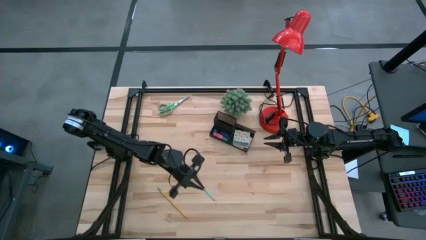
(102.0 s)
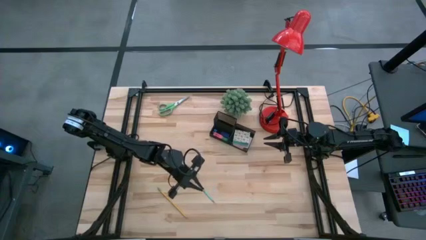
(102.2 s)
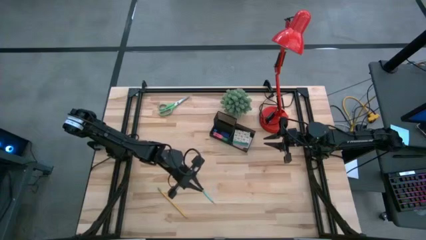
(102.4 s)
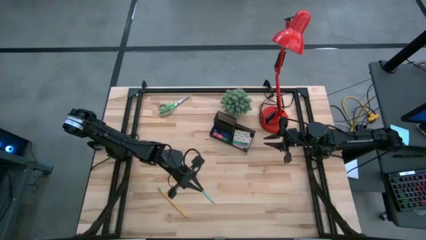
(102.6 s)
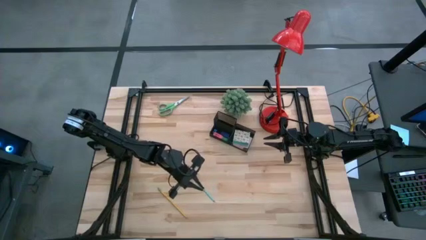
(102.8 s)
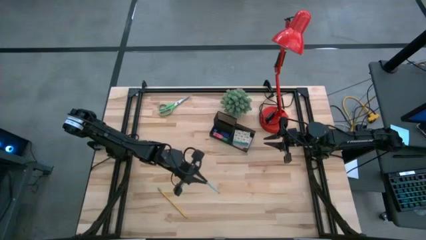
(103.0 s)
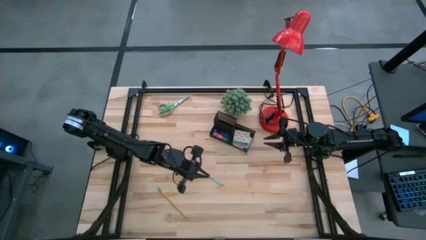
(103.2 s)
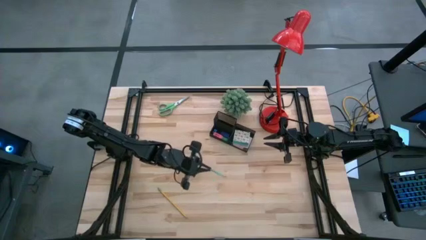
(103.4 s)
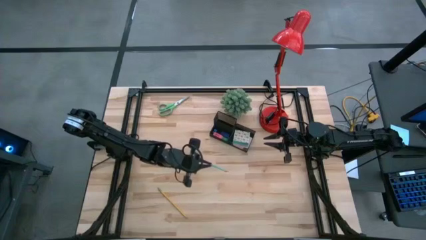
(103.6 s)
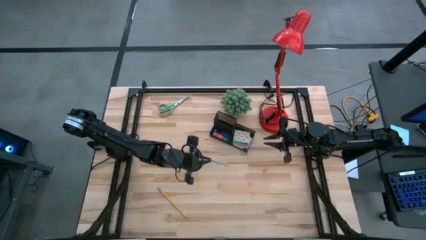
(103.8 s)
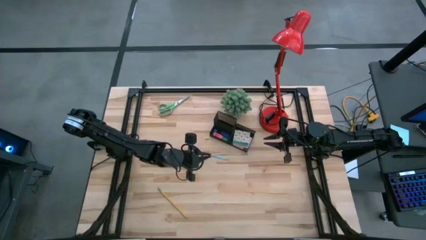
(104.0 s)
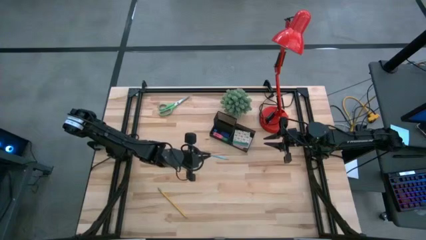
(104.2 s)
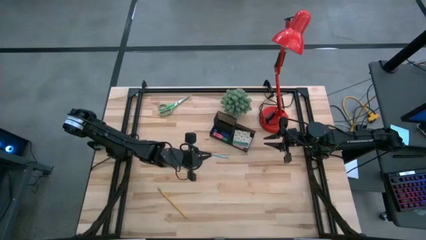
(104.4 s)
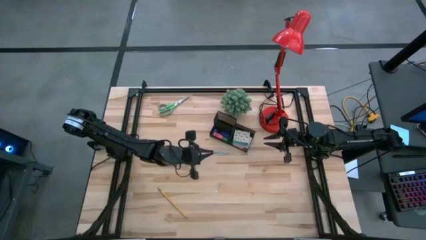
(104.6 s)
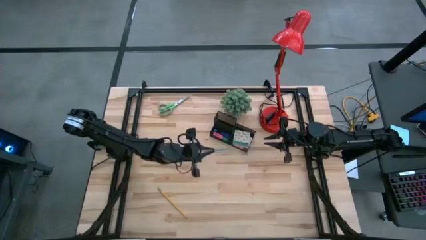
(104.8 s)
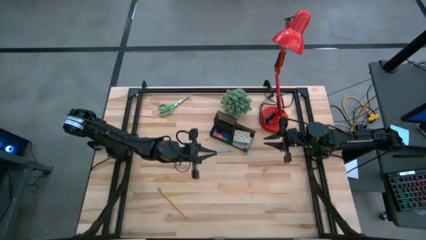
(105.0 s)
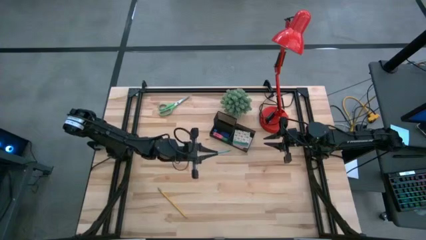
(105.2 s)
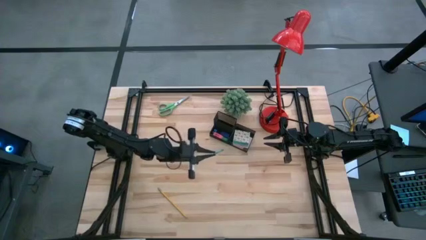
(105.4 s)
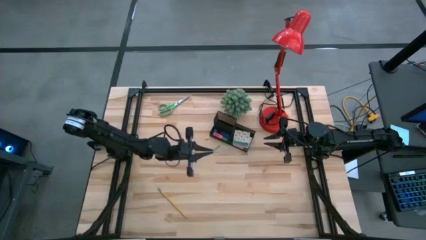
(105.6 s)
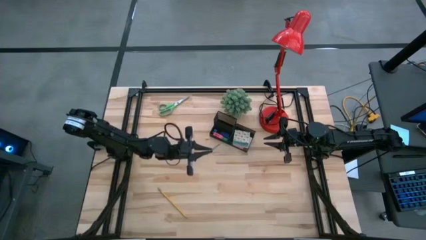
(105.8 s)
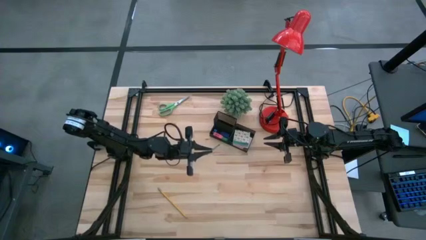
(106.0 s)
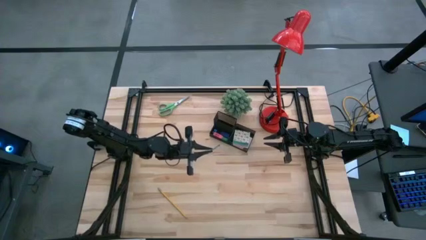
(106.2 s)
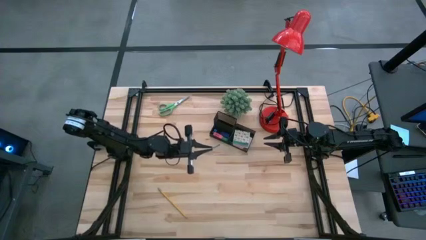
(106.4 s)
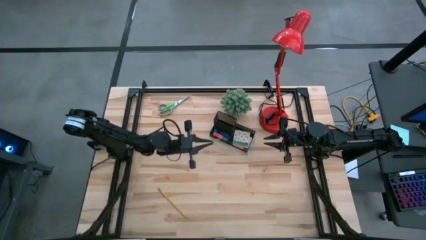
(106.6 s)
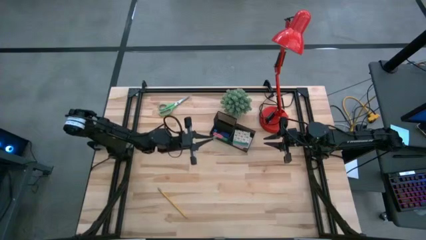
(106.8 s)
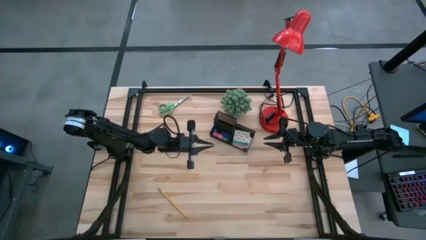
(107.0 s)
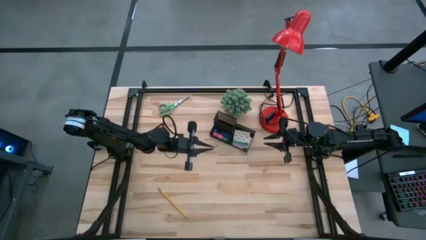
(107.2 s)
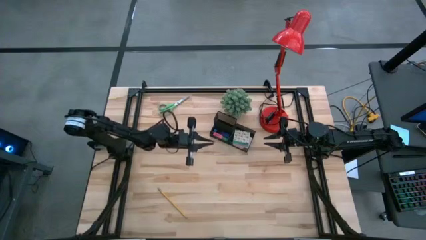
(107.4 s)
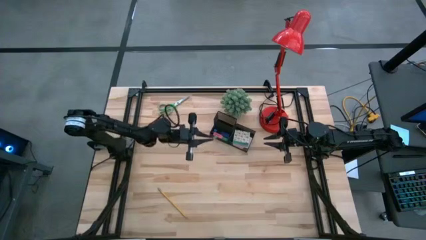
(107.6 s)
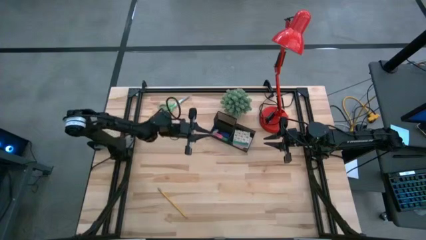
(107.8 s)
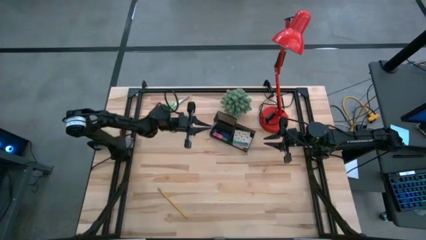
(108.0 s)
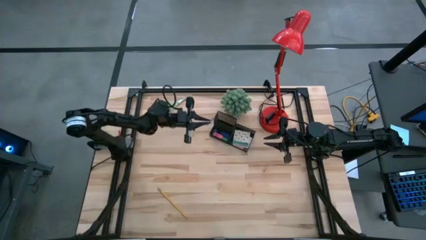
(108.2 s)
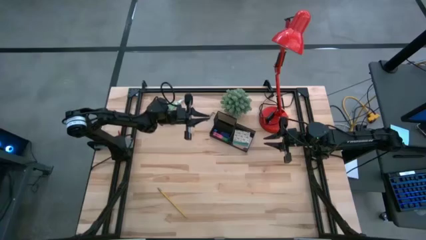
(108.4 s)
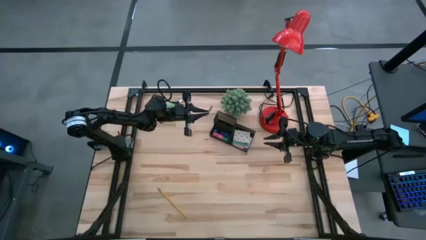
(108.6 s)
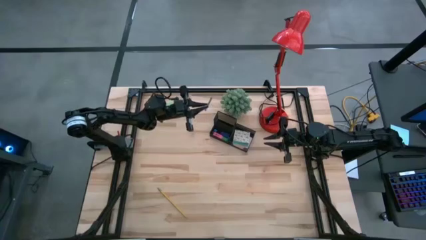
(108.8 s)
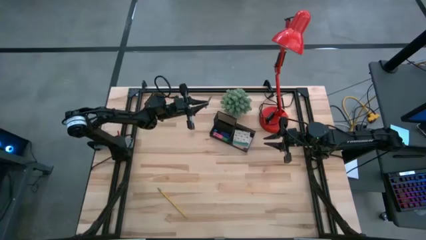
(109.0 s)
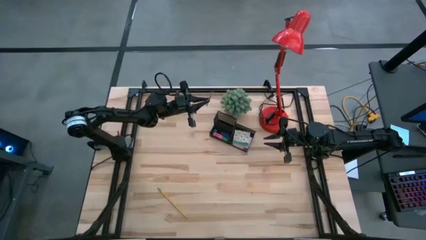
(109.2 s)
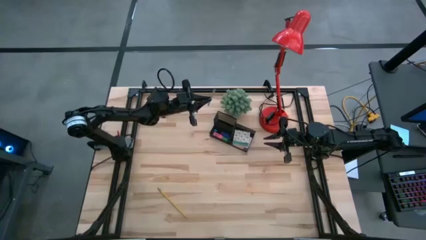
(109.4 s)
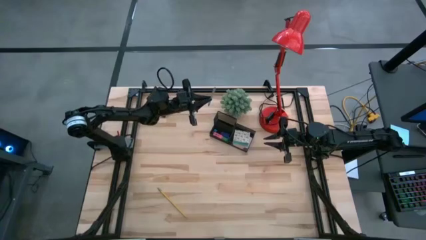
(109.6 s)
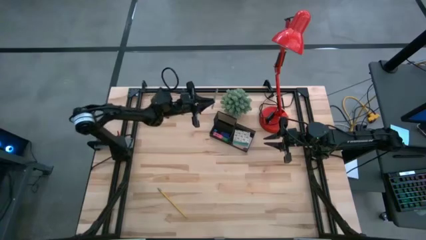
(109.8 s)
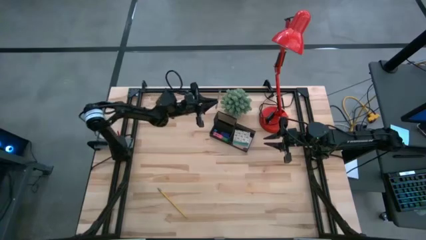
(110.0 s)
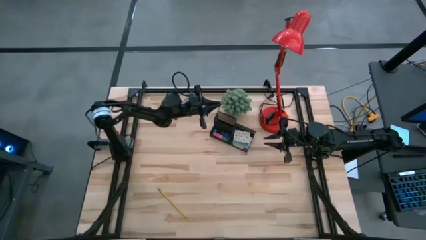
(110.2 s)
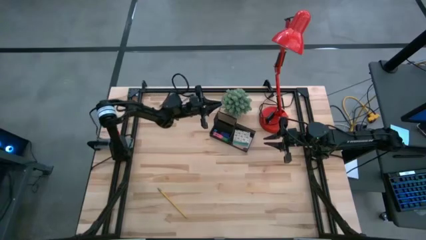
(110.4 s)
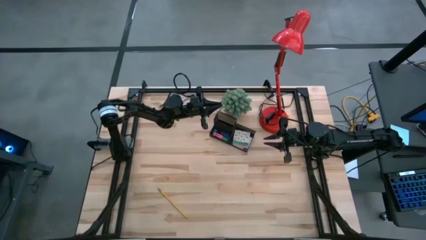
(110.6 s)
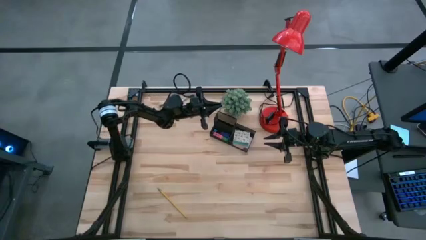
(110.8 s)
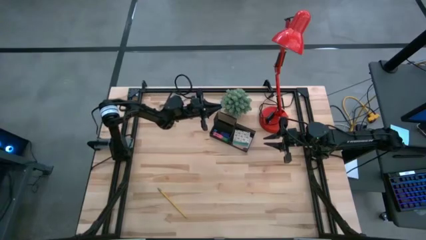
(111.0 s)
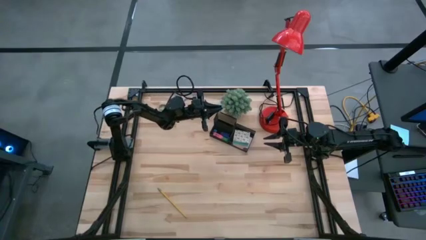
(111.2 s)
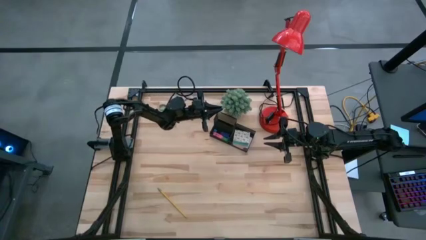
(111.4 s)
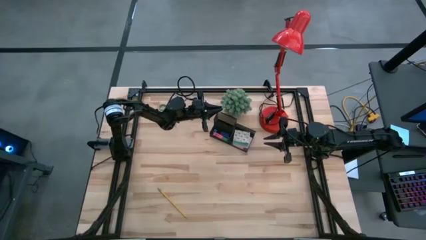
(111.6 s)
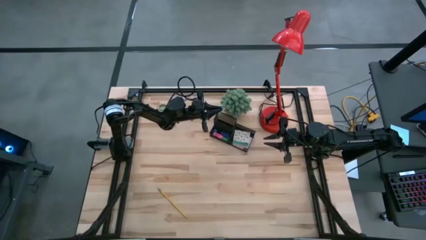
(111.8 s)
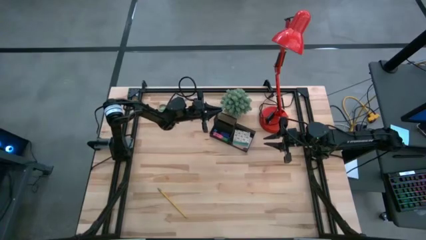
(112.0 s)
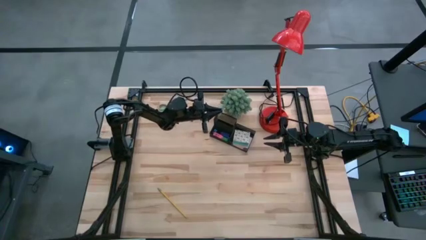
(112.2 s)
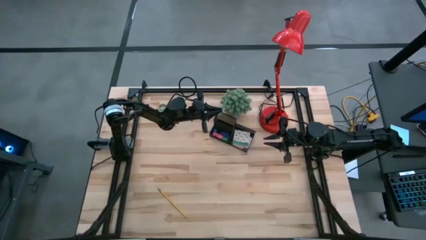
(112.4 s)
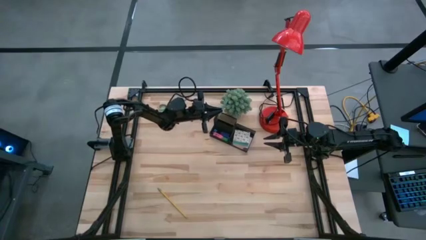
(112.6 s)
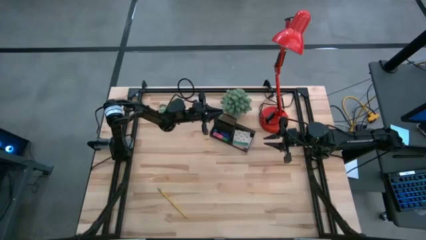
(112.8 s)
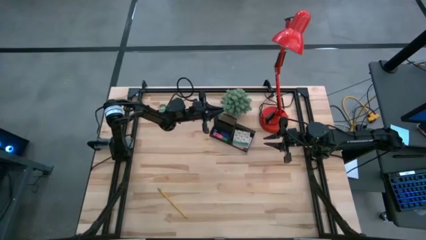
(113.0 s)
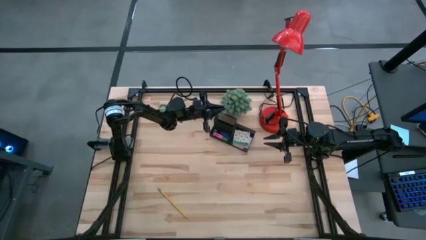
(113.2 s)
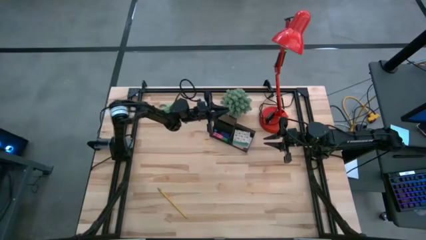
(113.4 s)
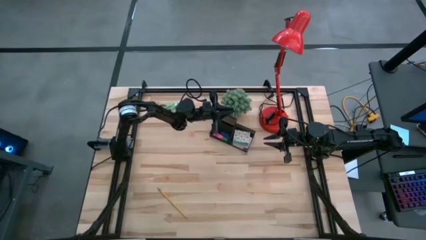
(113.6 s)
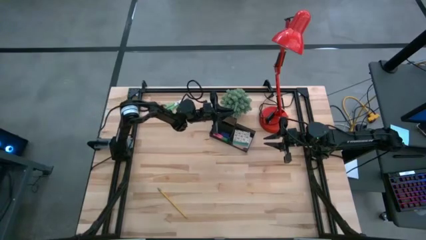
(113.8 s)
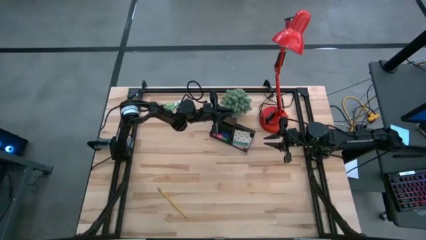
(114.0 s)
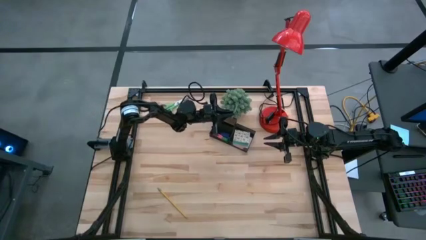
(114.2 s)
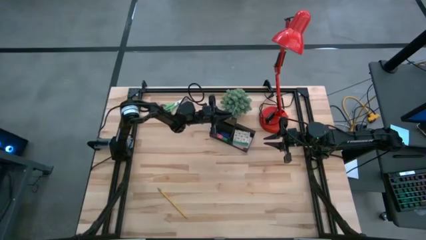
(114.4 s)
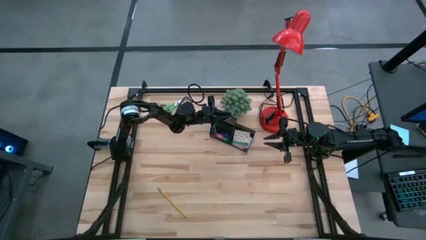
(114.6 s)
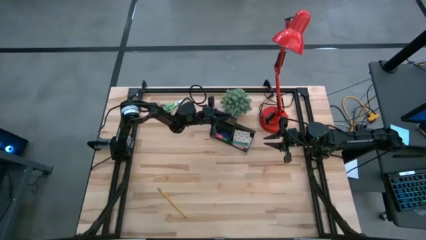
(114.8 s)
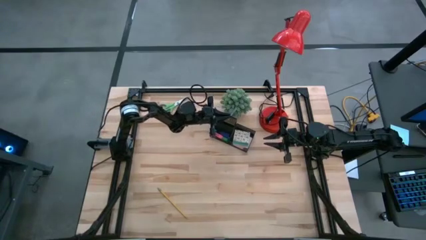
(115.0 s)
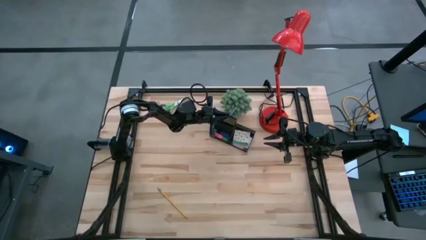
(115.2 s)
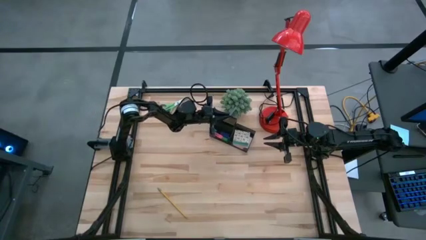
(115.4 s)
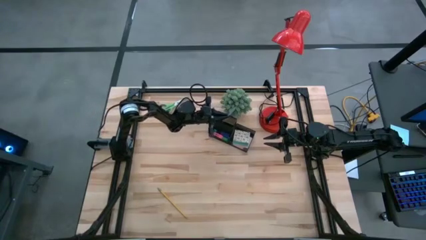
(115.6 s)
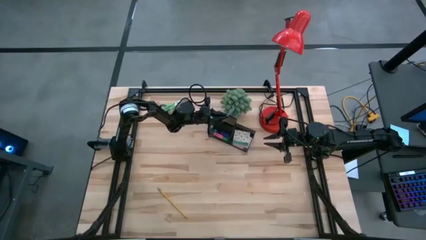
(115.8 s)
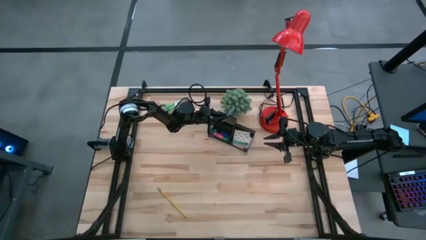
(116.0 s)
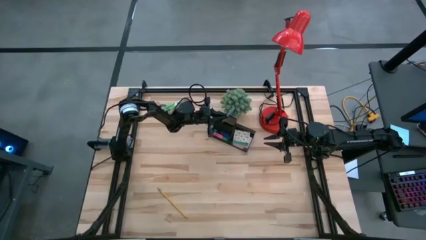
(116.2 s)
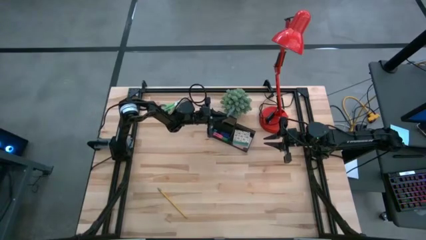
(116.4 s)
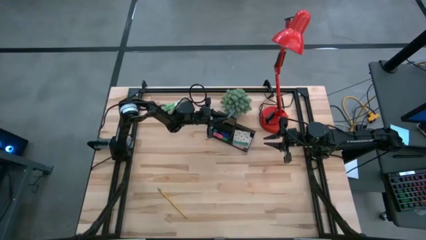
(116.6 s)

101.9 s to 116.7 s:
Task: Pick and place office supplies into organizer
Put the light blue pencil into the black desk organizer
